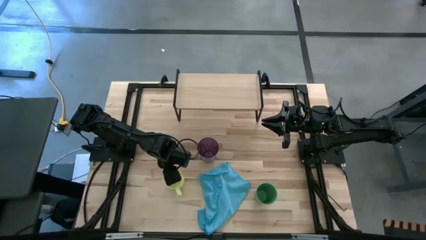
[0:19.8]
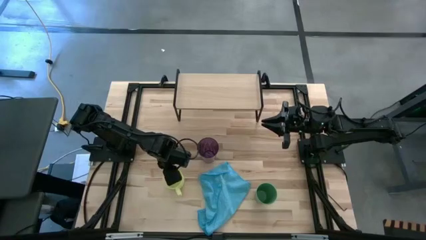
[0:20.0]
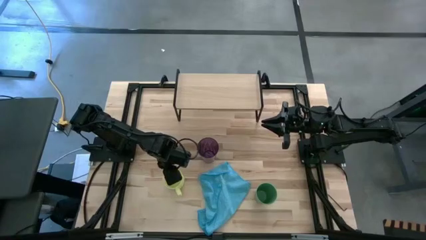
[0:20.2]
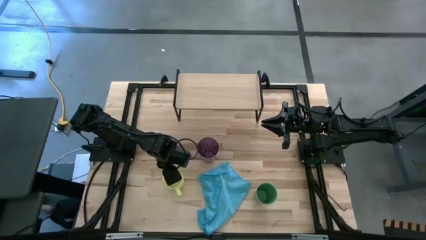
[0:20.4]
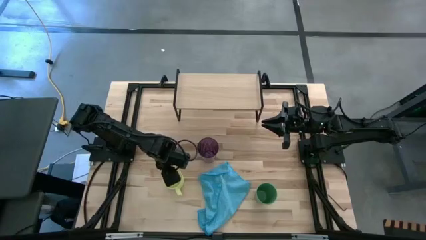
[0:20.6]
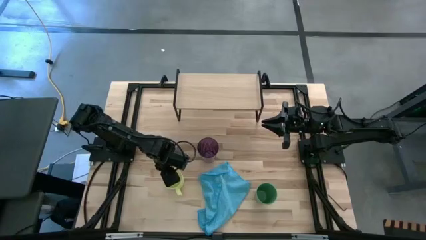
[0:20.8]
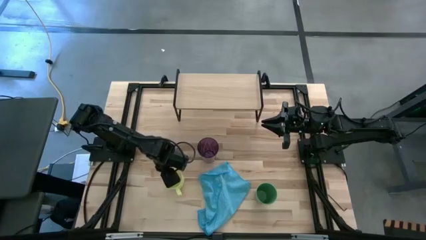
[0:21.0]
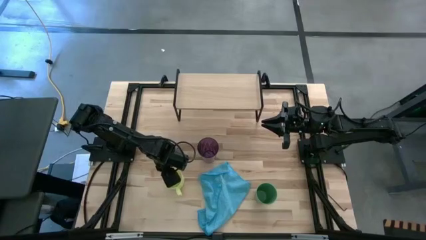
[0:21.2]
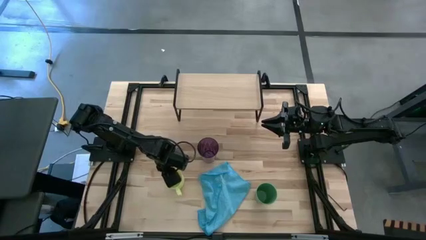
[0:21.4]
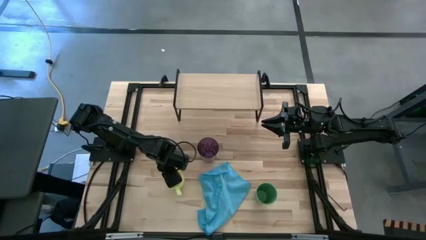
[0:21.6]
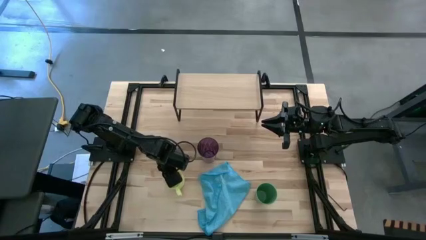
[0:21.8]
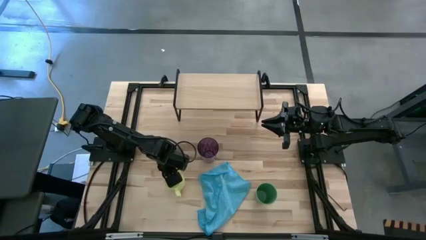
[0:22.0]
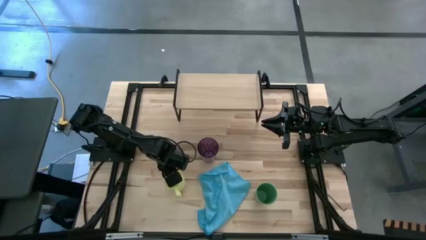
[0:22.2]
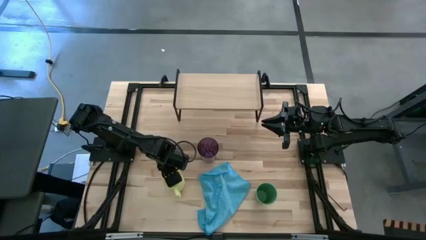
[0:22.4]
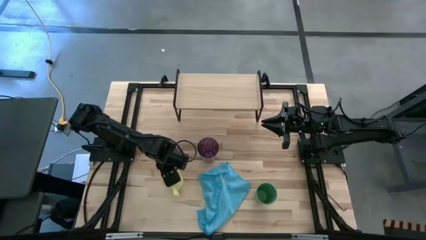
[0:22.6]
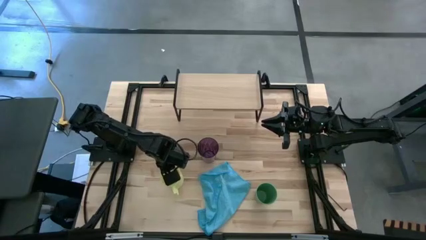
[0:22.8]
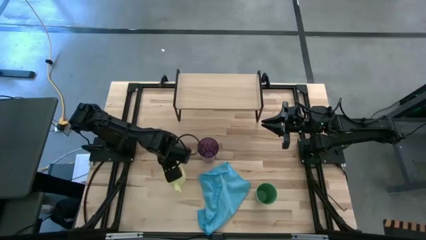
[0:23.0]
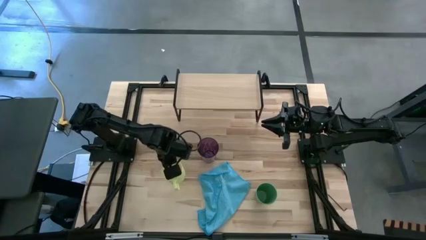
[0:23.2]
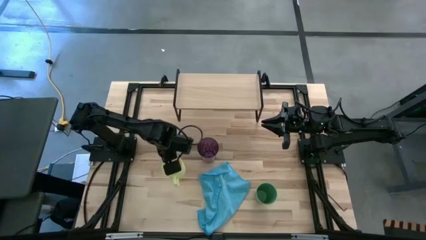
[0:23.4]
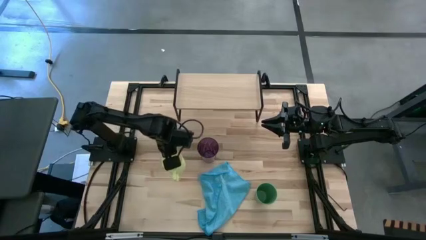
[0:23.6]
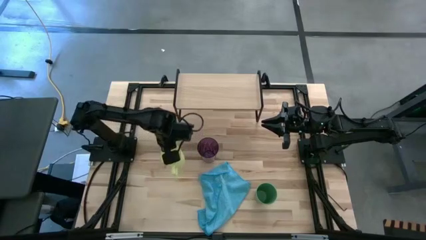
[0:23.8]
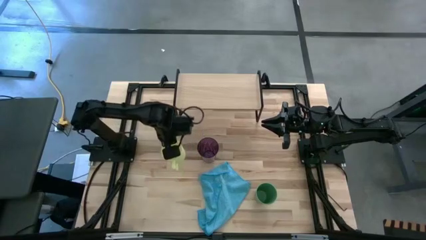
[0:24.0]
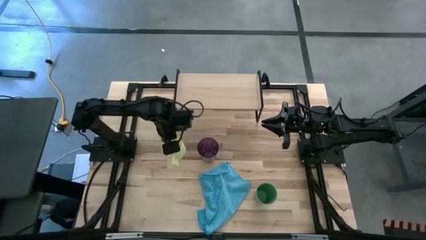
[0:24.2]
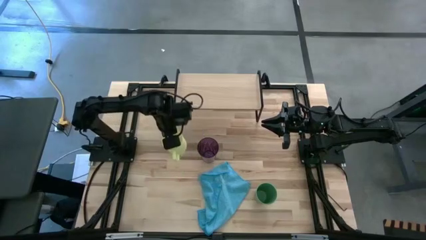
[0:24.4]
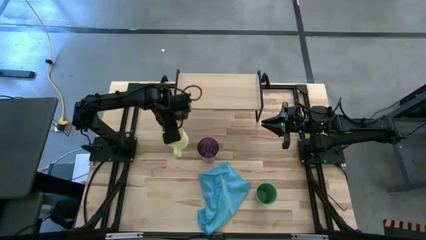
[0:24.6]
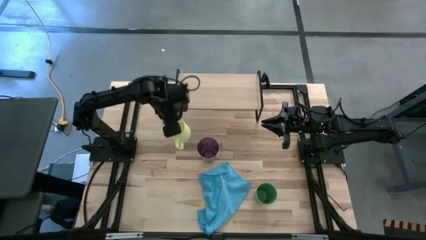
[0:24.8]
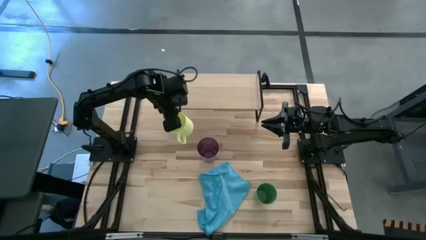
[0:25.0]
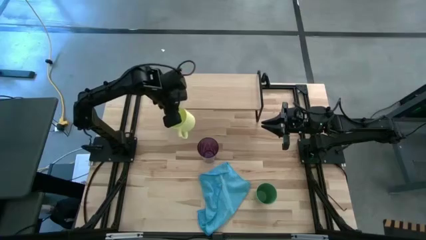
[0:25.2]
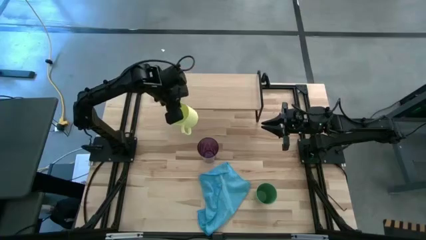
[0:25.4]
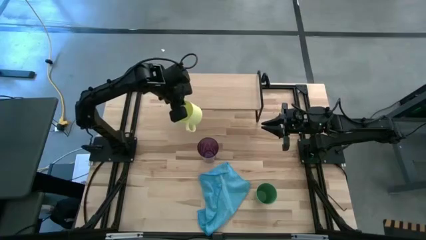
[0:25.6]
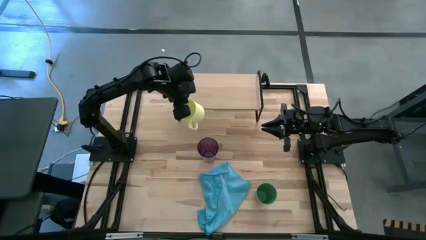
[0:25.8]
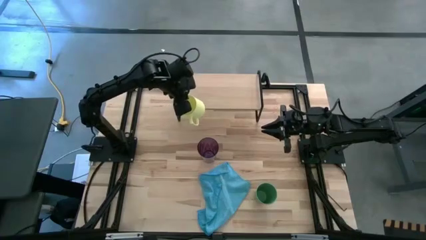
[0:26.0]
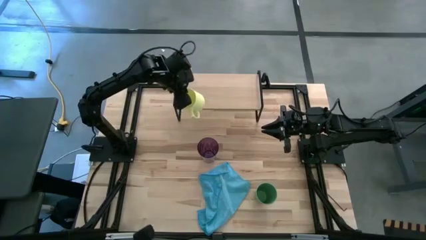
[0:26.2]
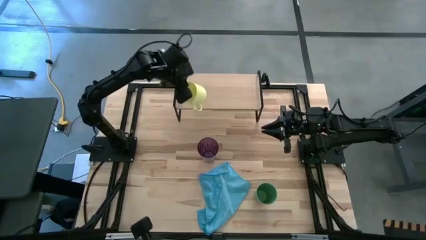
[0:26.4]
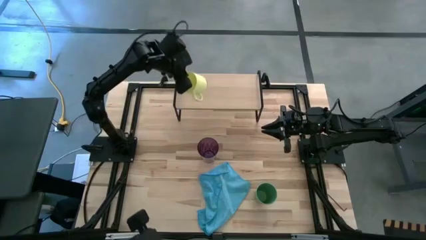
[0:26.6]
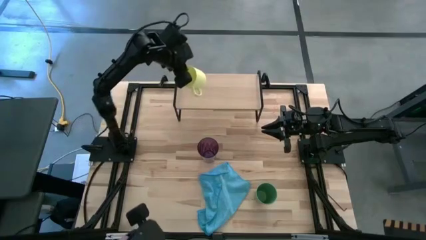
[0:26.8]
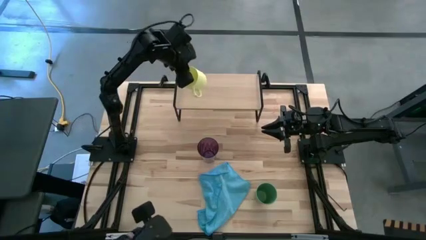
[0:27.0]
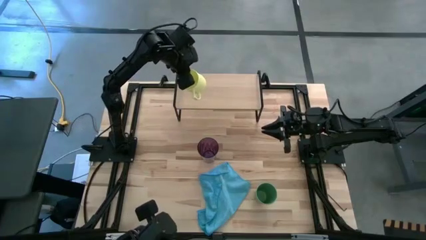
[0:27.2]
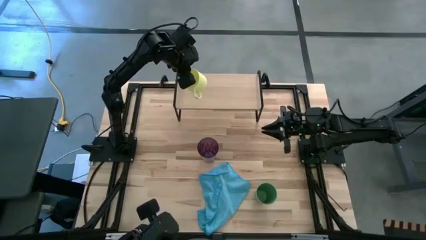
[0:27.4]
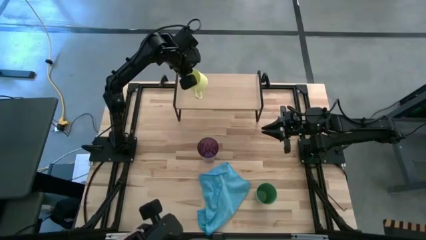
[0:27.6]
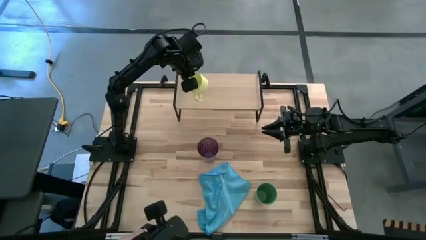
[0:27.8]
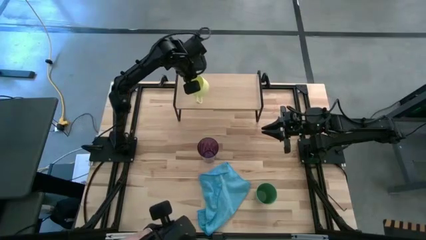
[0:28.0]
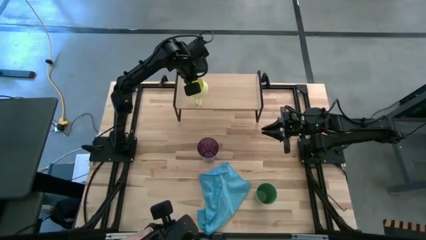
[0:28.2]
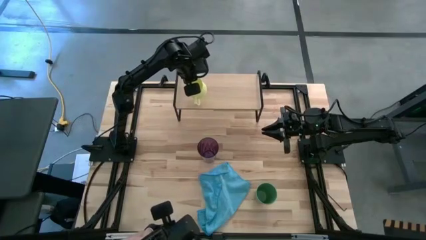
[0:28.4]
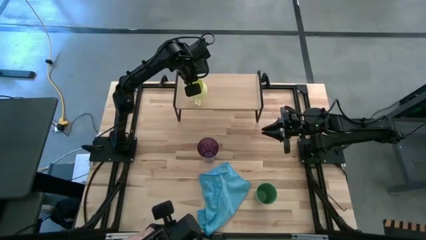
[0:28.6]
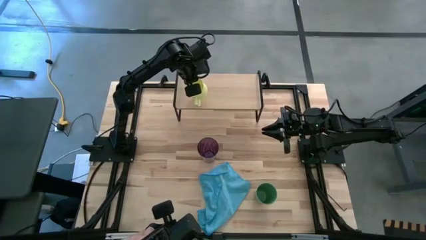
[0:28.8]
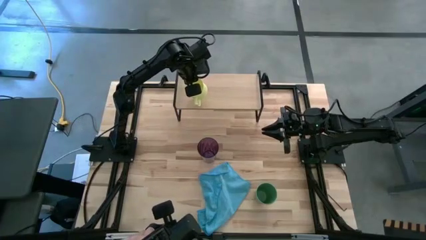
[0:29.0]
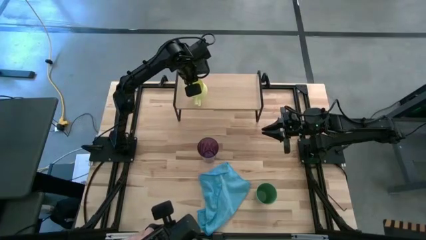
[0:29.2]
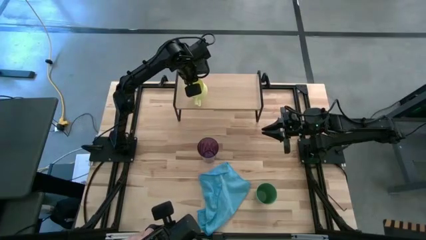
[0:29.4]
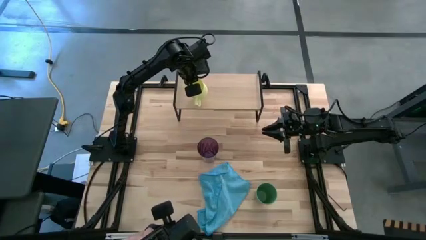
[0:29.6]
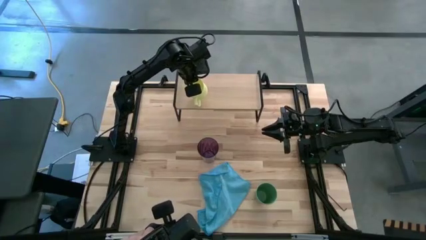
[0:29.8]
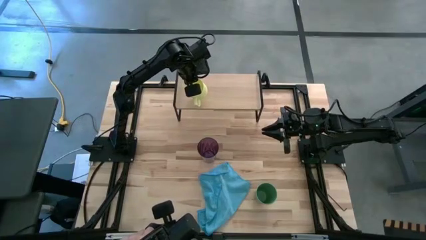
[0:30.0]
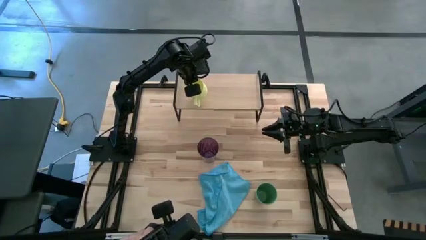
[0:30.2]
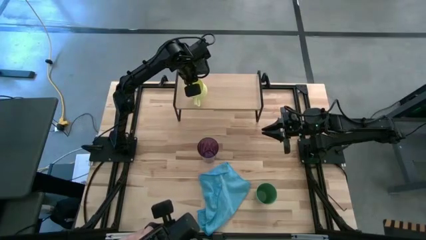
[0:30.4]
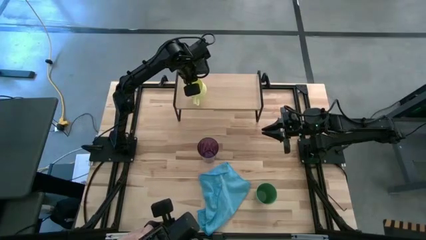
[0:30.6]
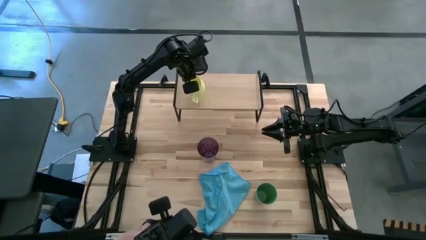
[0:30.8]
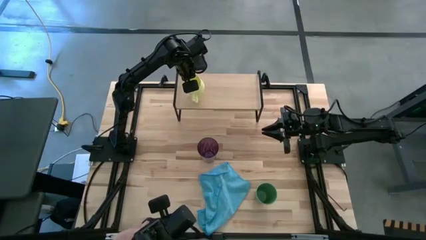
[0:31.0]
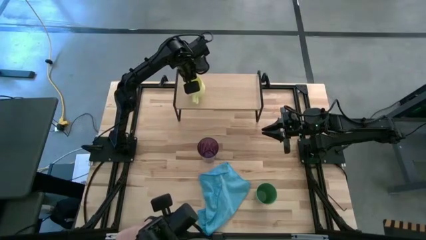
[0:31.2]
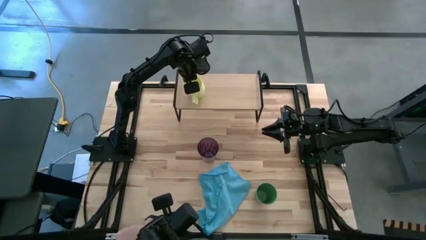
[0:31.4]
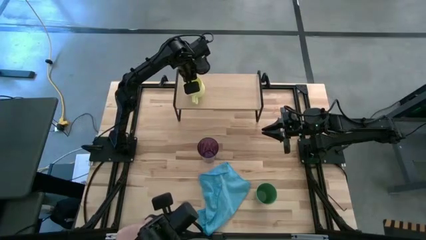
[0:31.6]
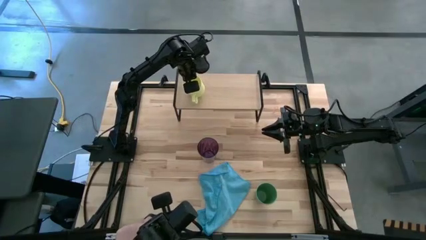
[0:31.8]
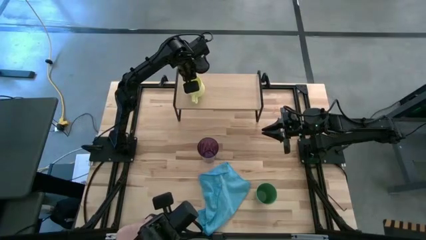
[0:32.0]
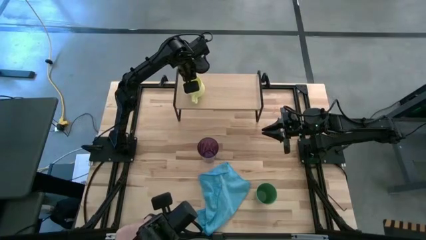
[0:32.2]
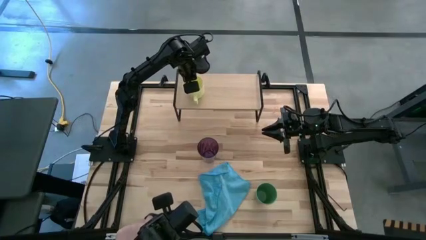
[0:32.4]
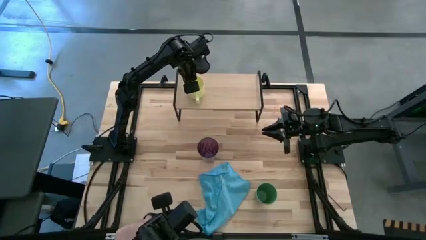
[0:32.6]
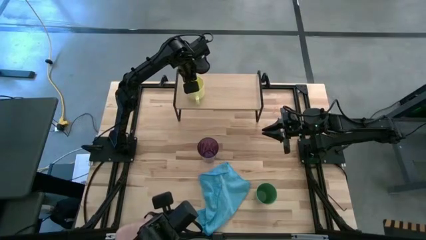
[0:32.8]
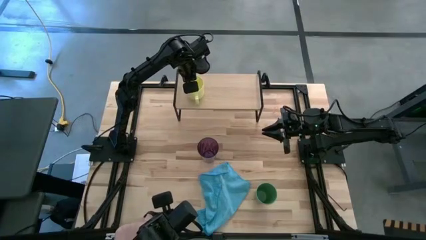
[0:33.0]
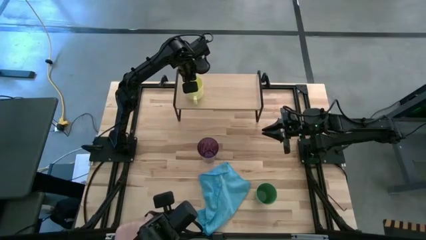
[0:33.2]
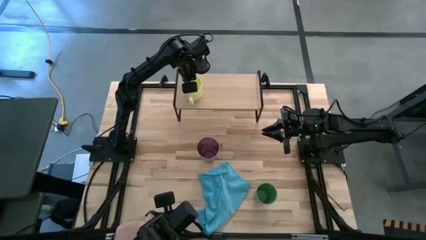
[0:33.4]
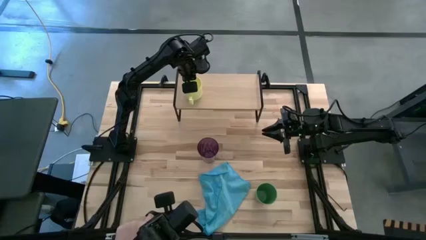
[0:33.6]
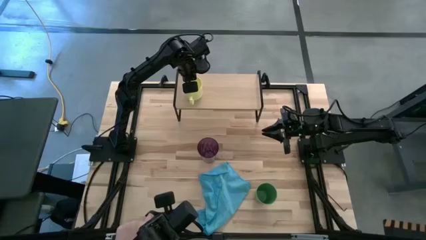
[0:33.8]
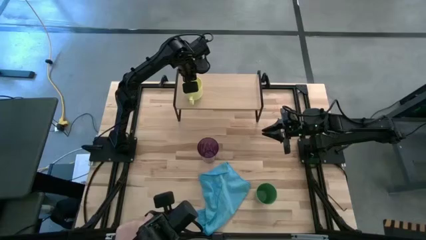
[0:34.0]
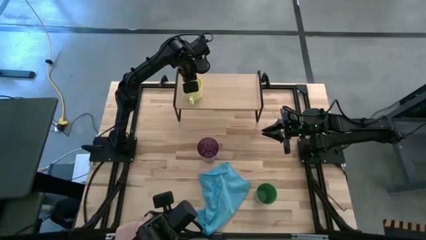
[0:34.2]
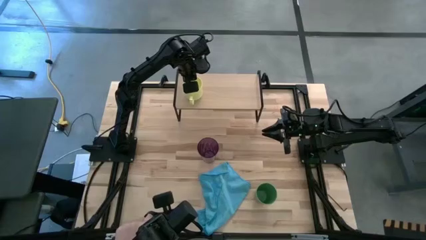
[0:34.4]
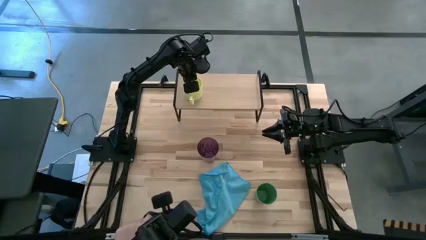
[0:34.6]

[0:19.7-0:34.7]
Task: Stack small to large cups/mugs on shelf
Put the yellow cup on the shelf
